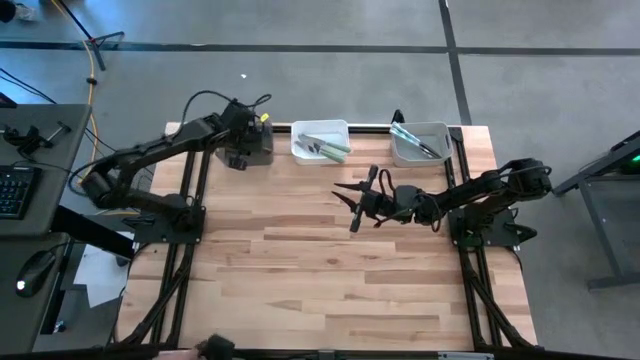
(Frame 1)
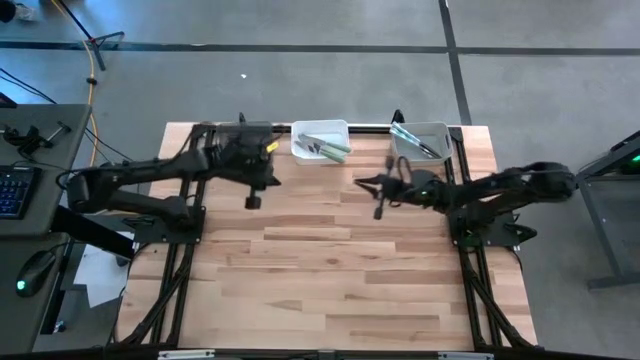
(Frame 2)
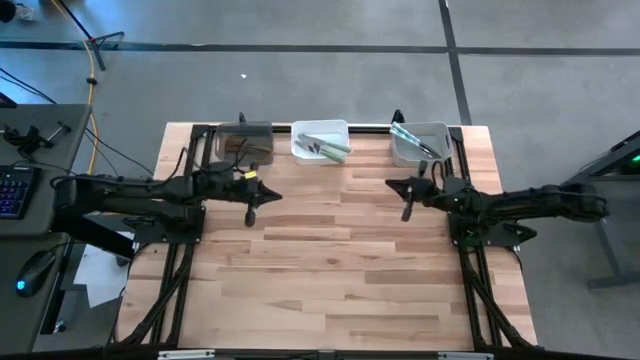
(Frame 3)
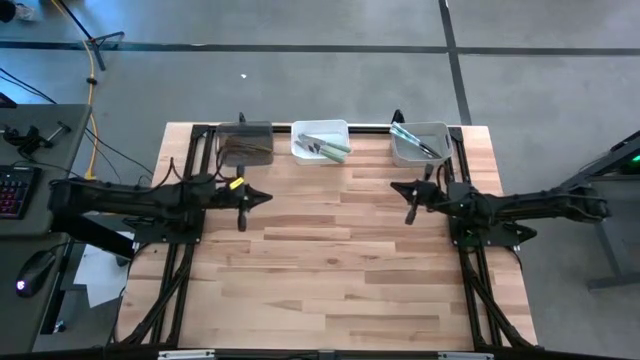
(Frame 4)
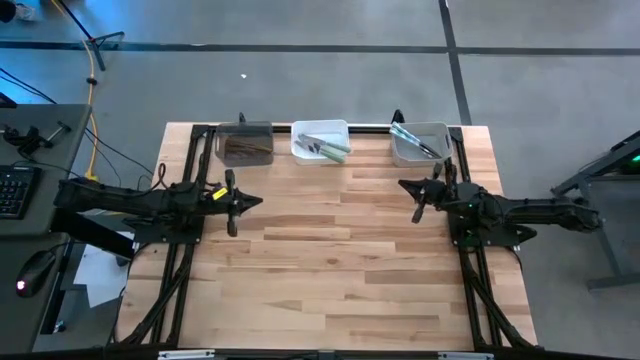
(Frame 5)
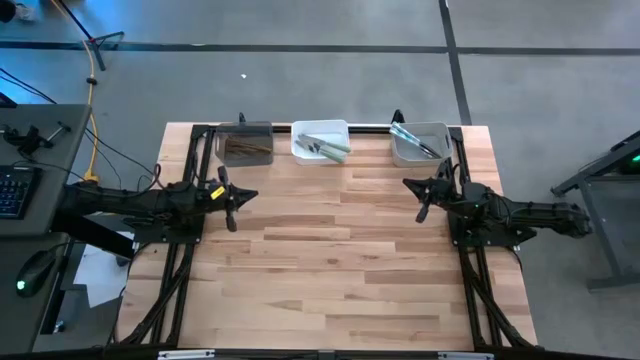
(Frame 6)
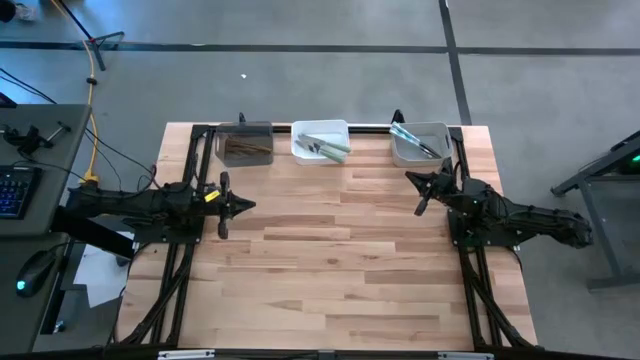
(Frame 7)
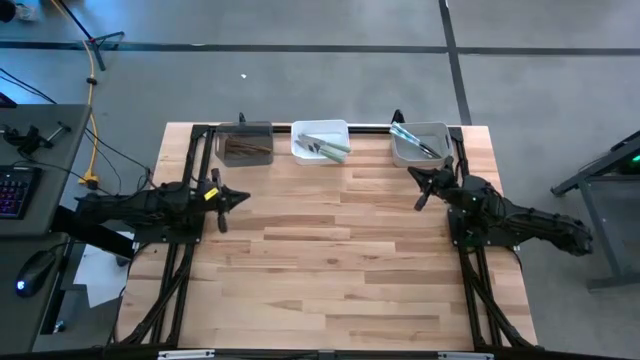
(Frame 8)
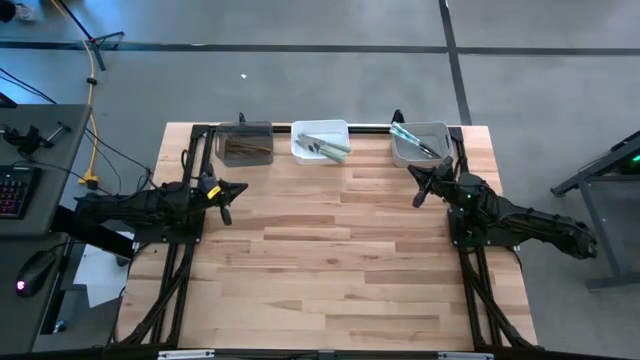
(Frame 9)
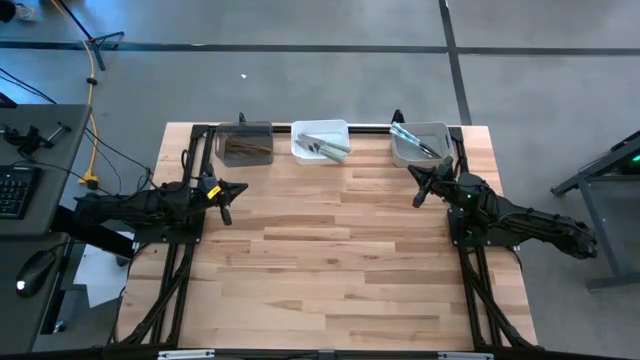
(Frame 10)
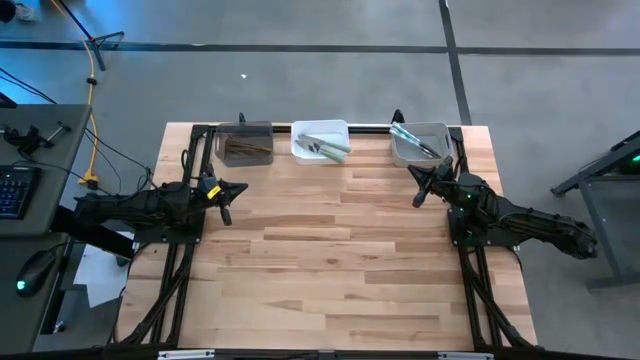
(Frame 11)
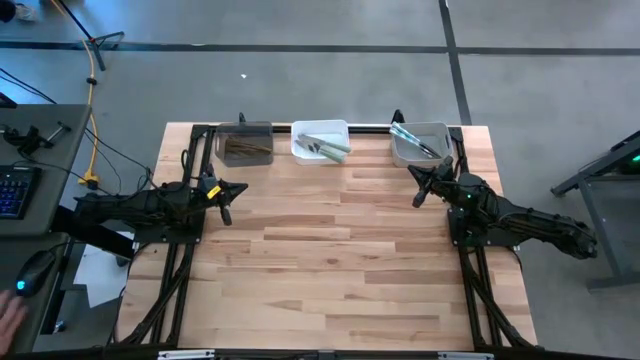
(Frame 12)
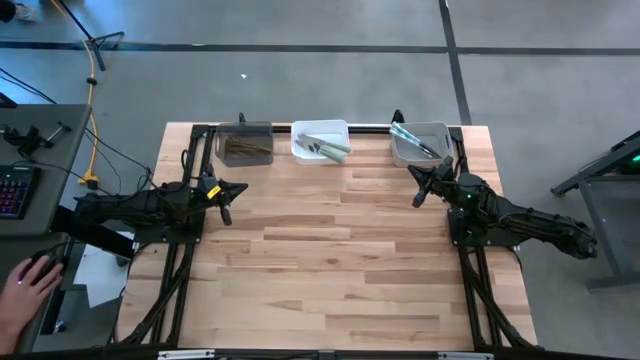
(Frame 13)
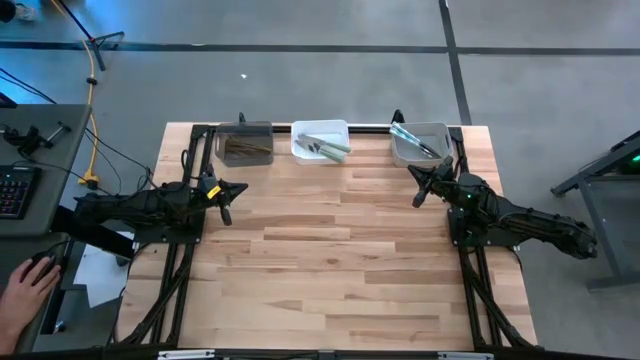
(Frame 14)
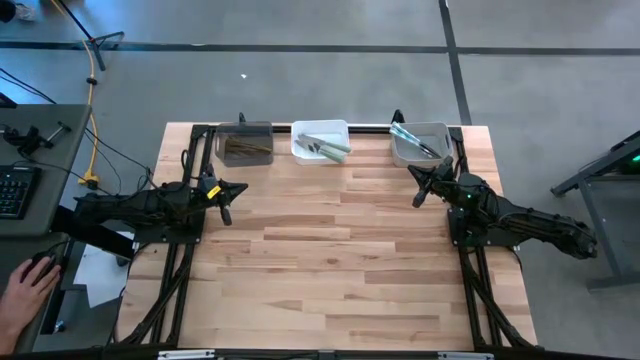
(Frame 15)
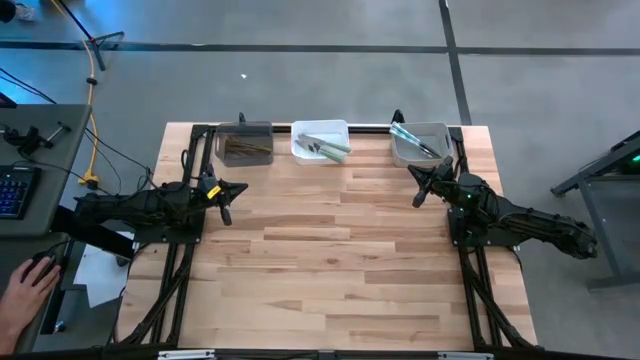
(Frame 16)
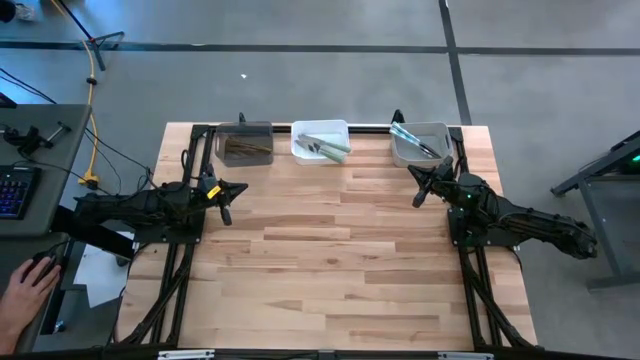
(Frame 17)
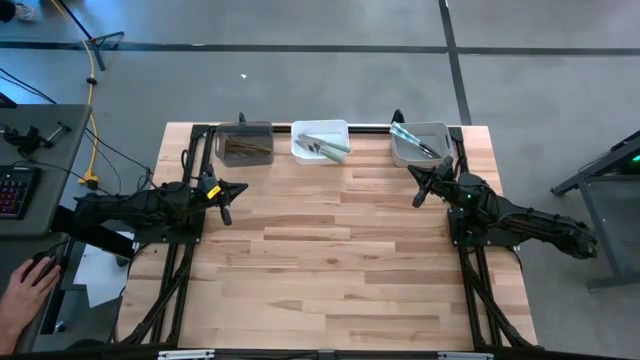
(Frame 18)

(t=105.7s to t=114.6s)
Task: Sort silverware by color (type)
Return to Home Position

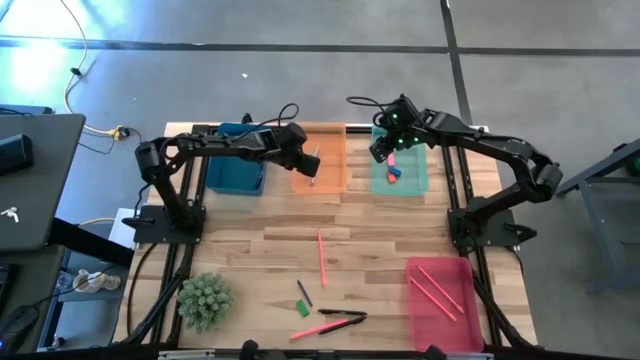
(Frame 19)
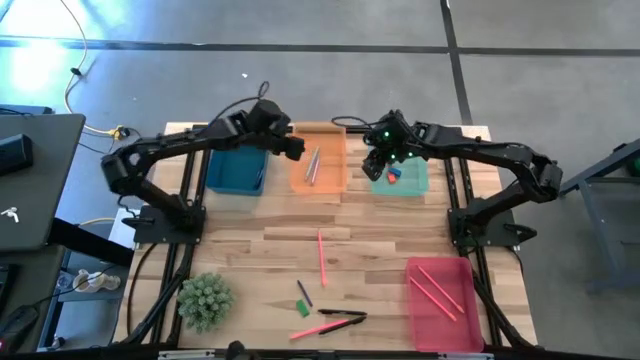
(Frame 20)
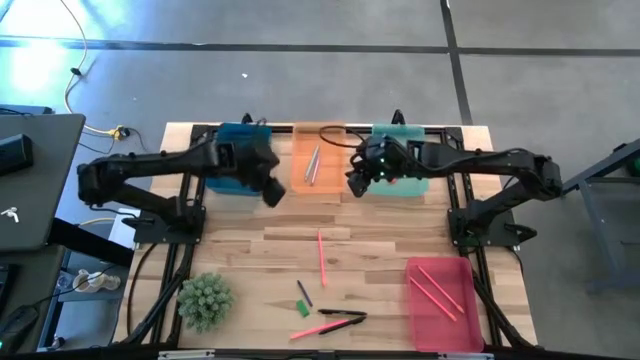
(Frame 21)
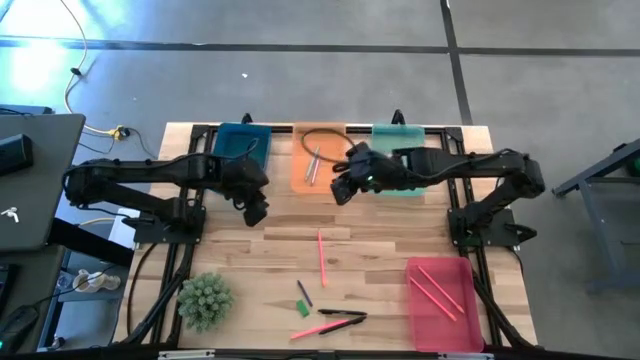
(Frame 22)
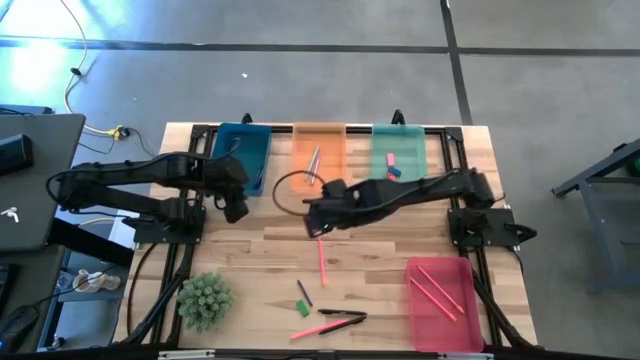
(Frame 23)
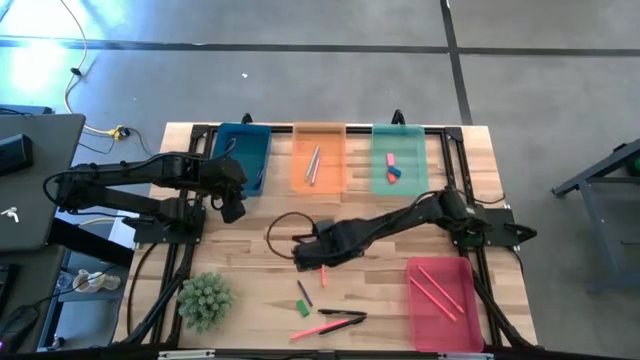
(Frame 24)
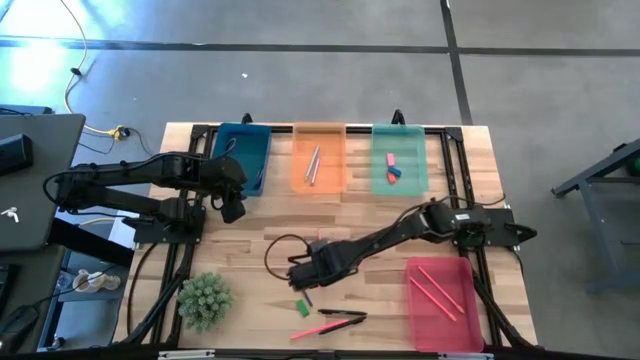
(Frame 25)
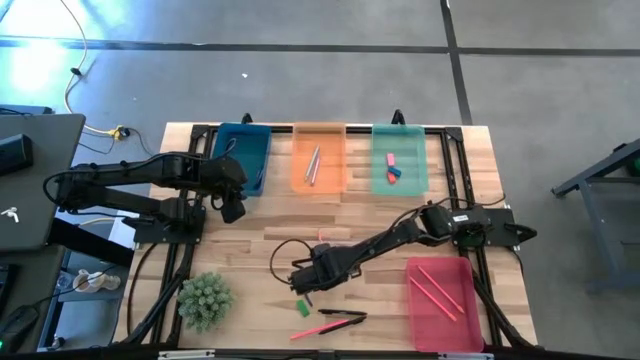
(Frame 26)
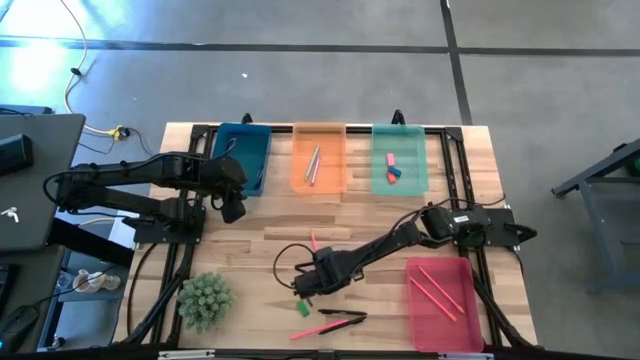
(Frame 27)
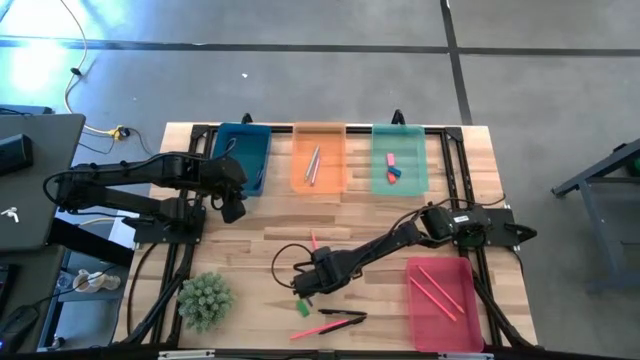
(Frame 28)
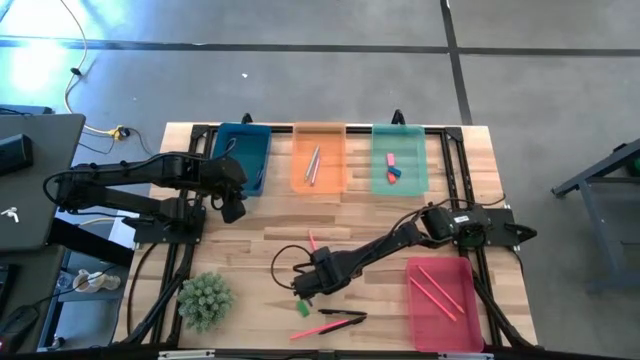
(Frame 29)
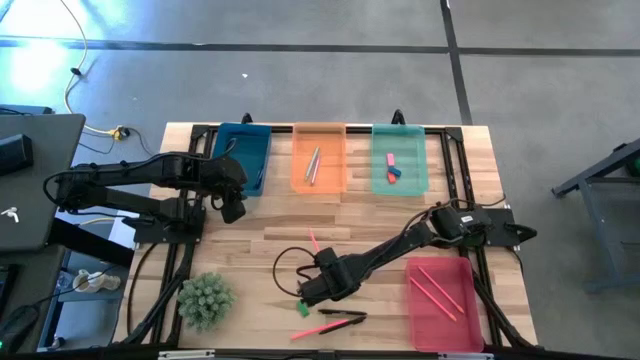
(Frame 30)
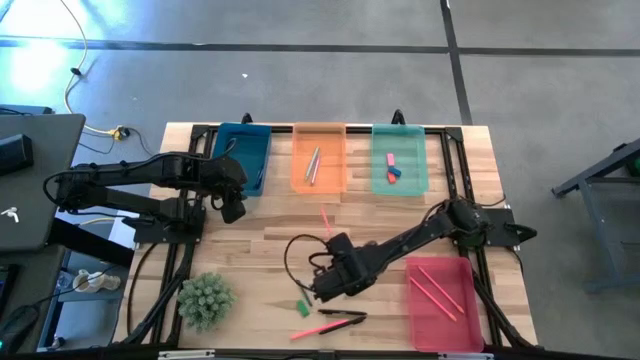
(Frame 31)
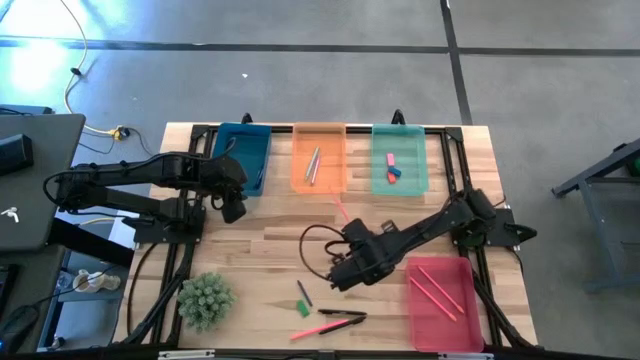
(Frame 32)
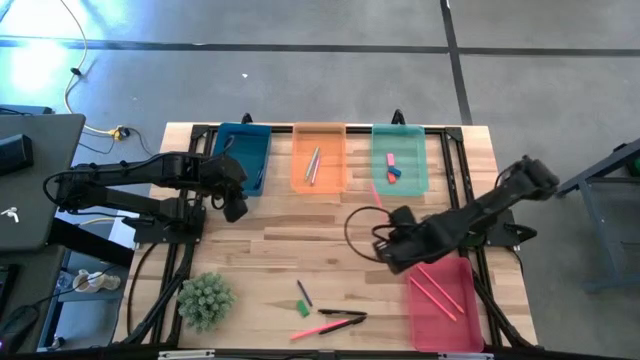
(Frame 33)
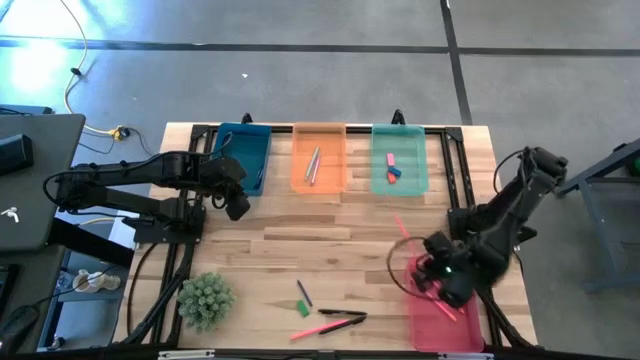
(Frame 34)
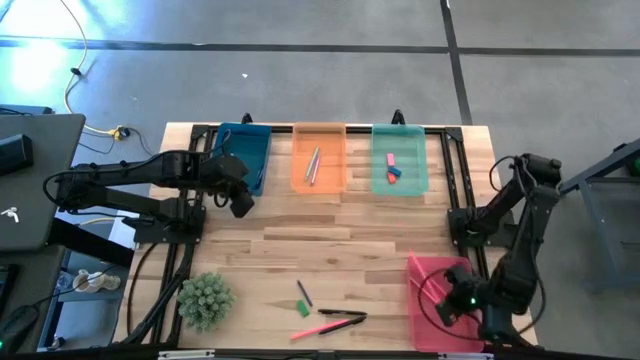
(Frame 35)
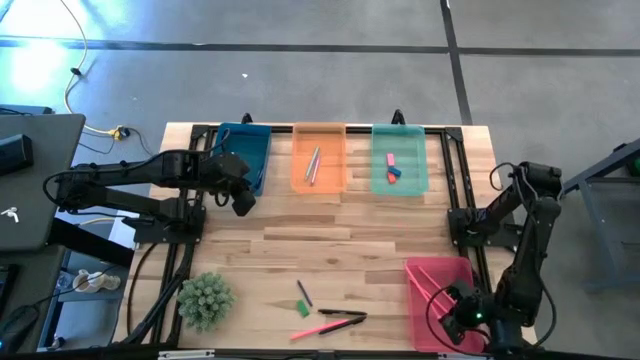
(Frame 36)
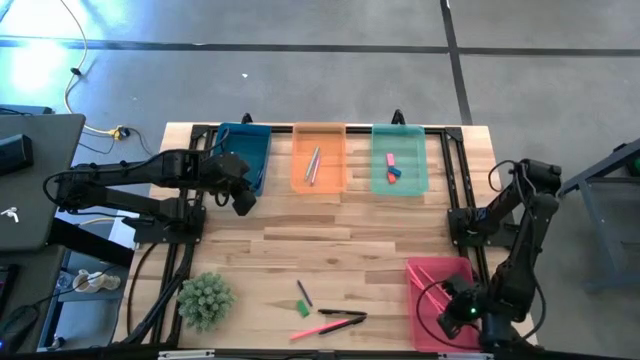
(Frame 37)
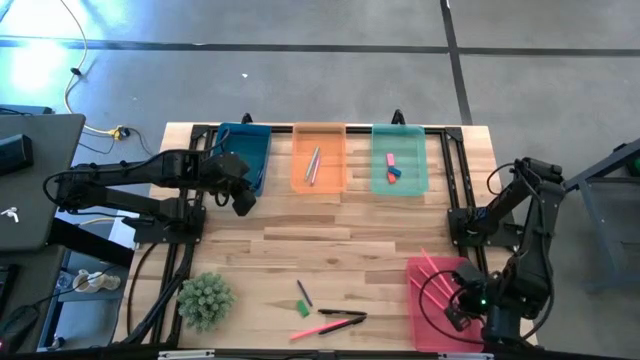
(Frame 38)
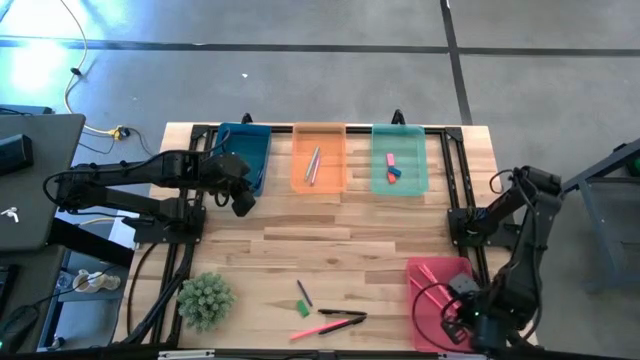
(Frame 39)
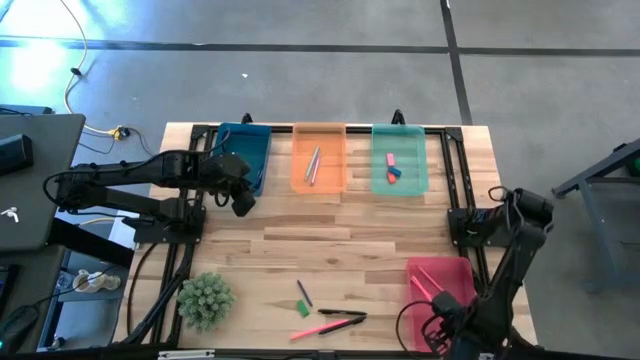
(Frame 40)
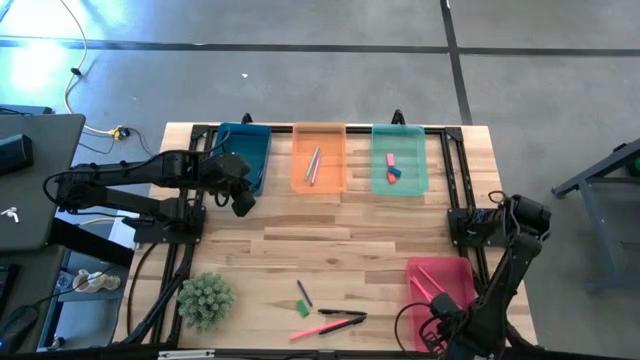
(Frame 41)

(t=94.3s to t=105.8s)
Task: Sort crayons/erasers/pens/pencils in bins
Put the top pink pencil into the pink bin
